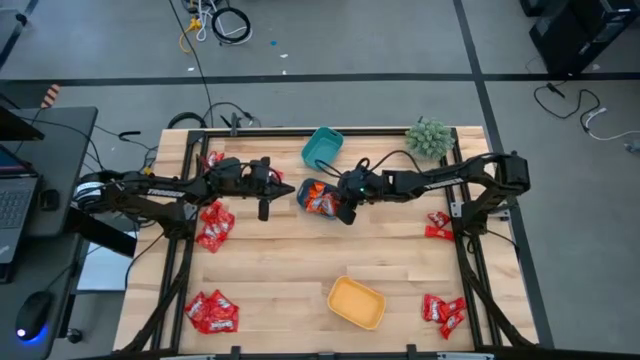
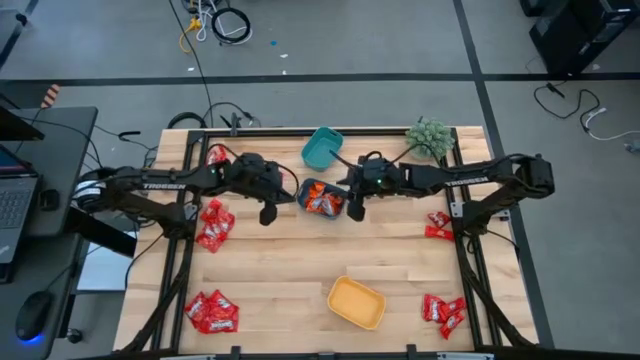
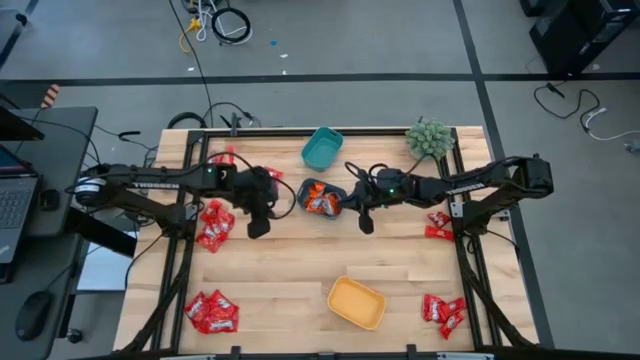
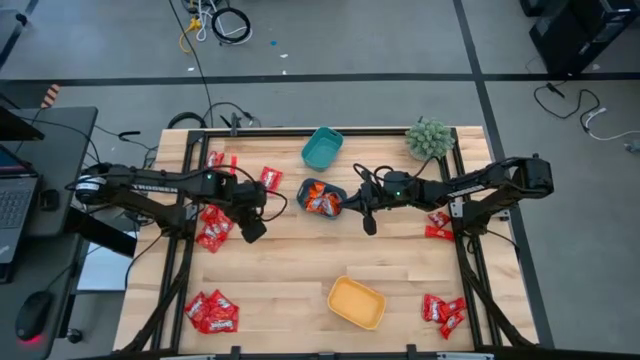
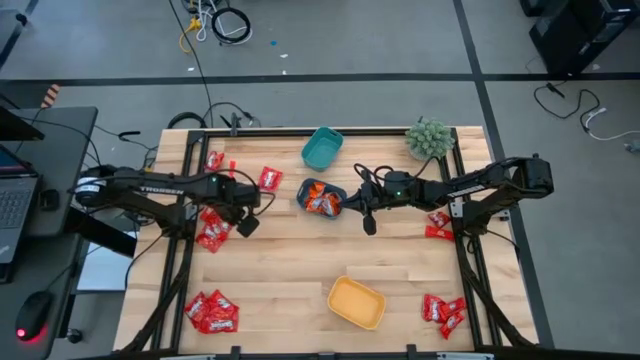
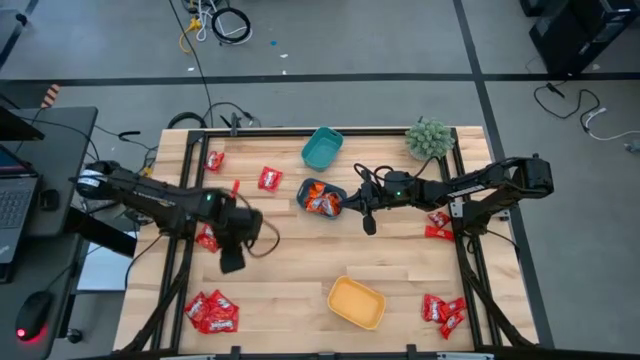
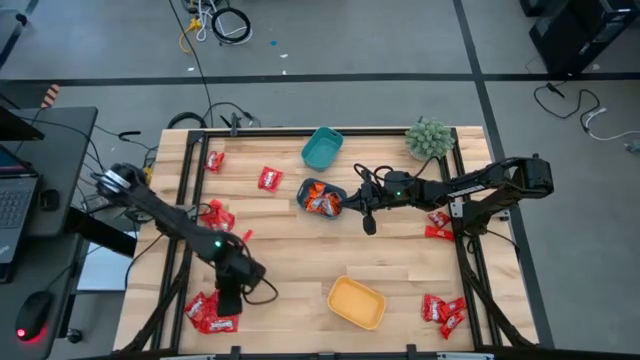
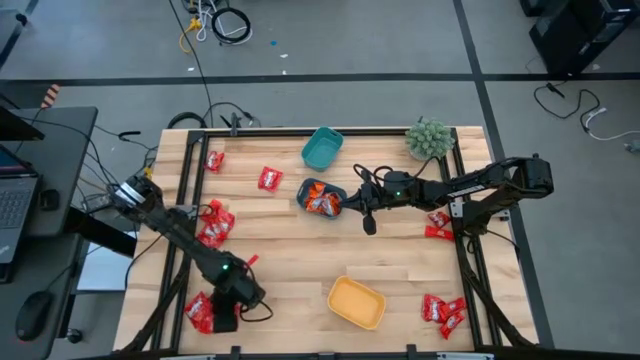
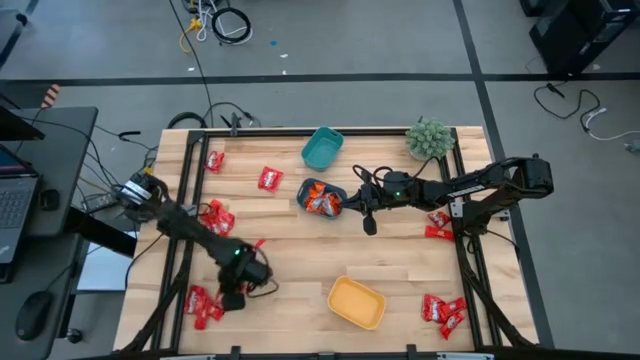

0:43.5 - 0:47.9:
Task: Sort candy
Move the red chocolate to the

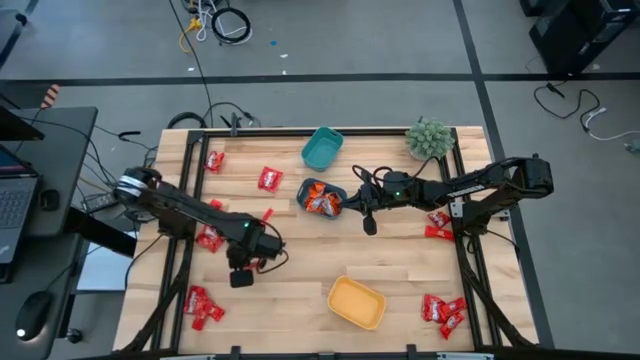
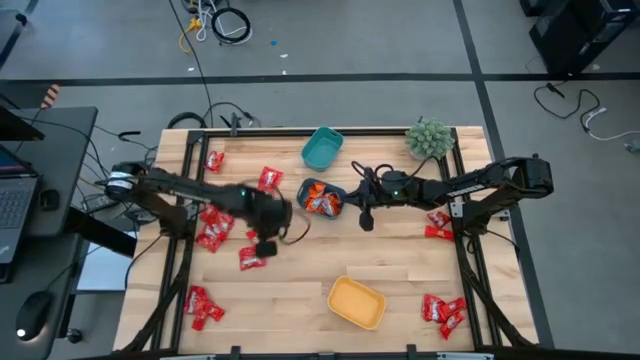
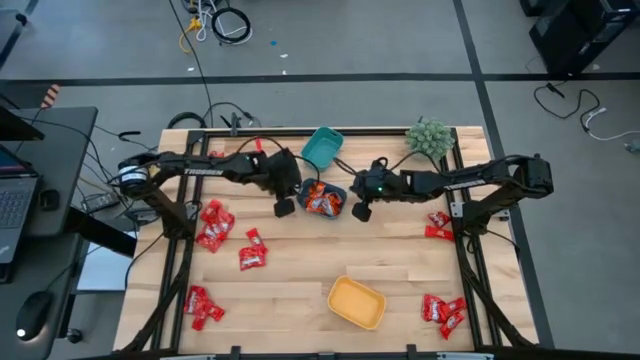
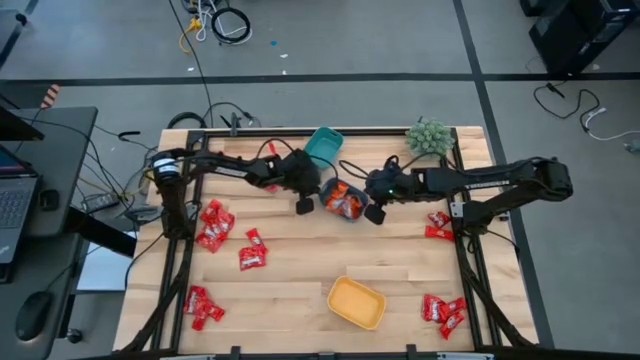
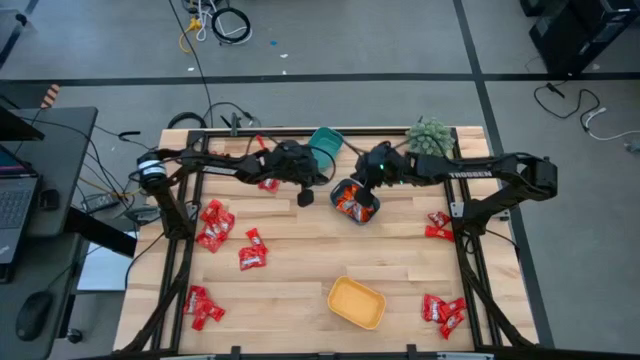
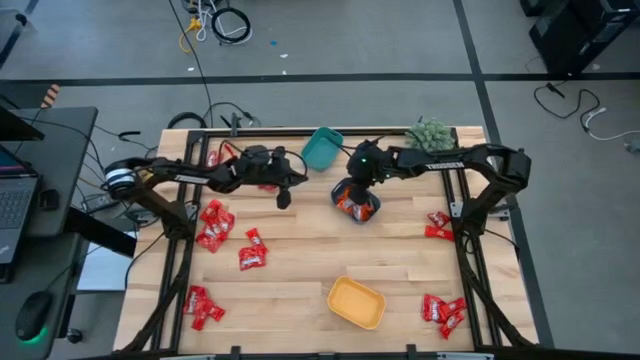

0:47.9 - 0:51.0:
Adjust the center blue bin

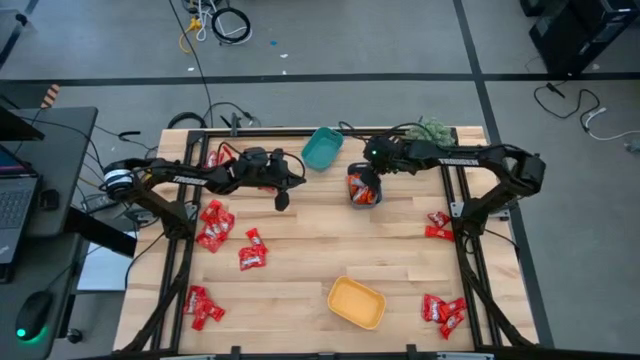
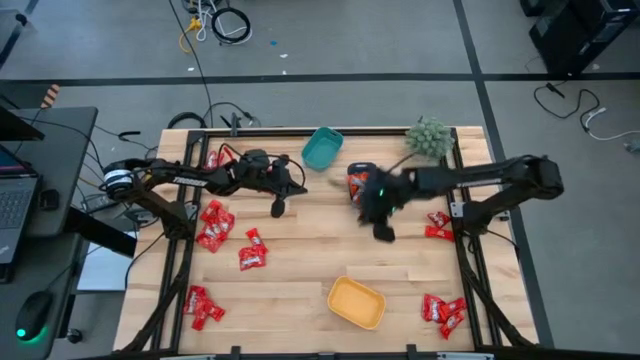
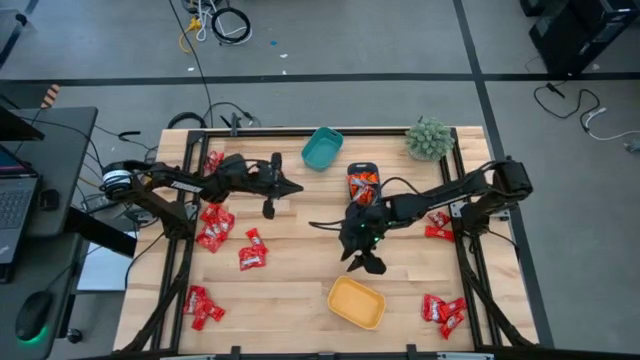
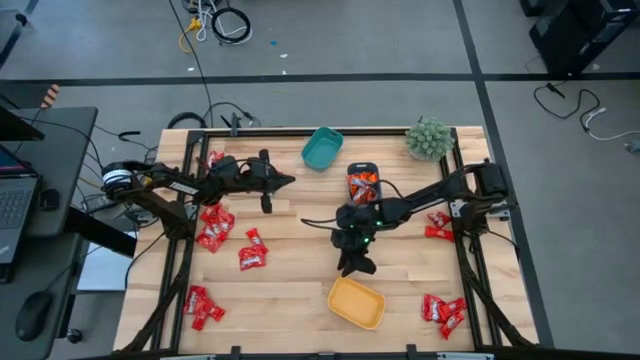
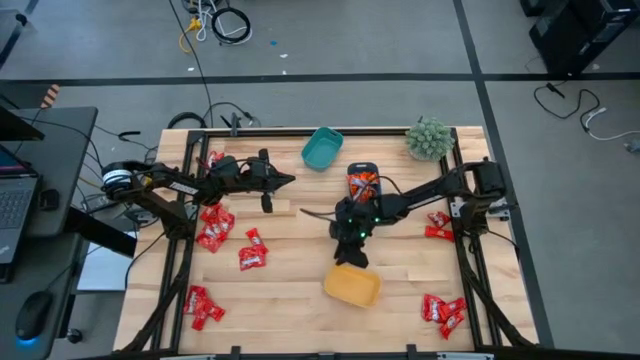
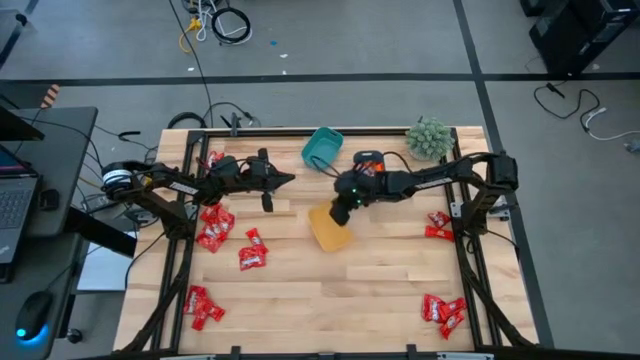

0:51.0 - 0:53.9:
Move the yellow bin to the center

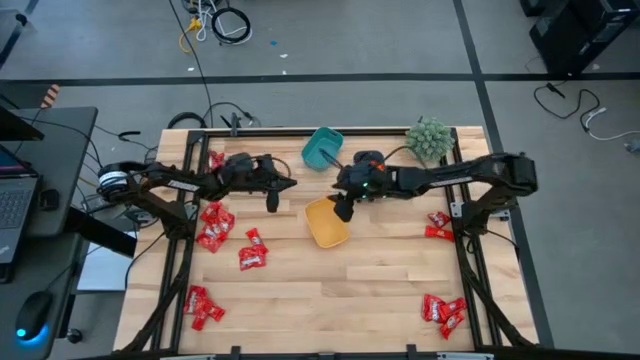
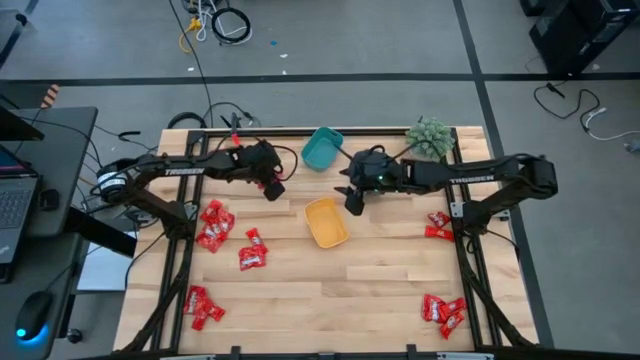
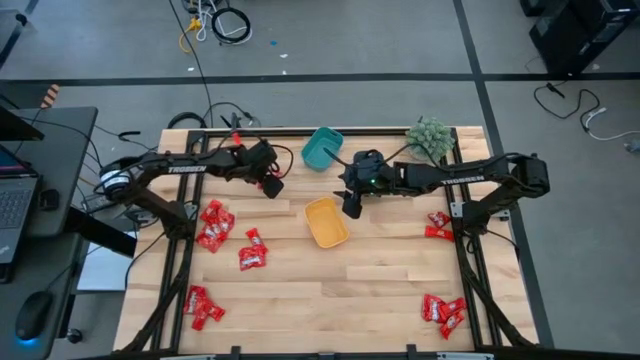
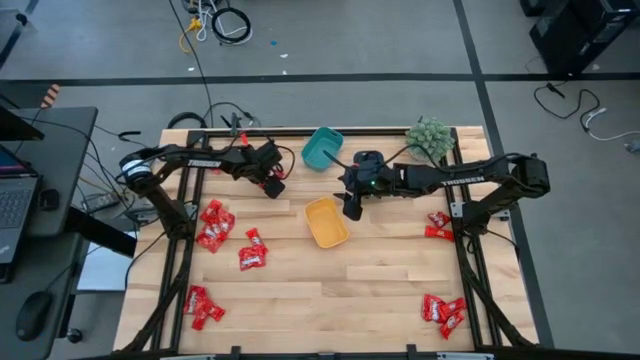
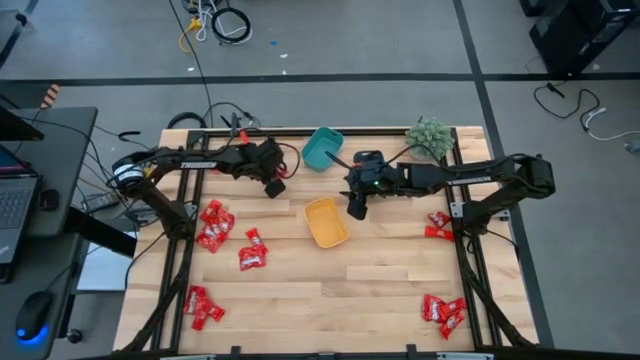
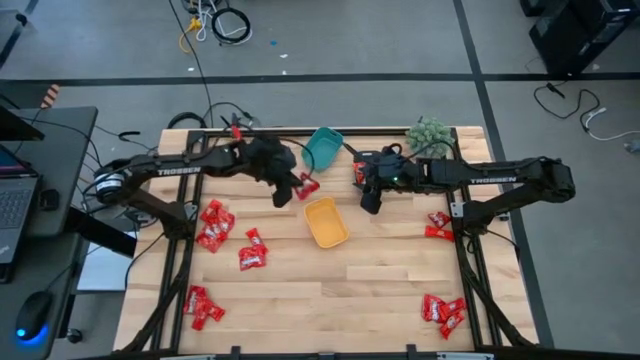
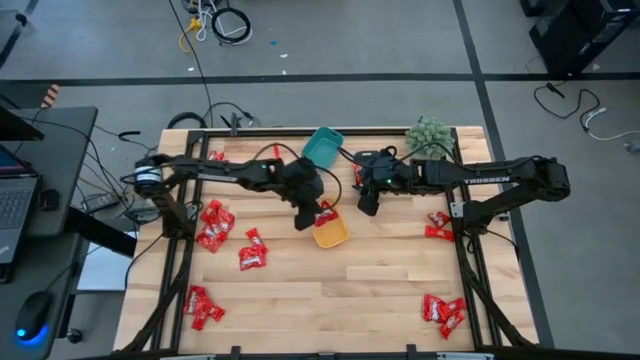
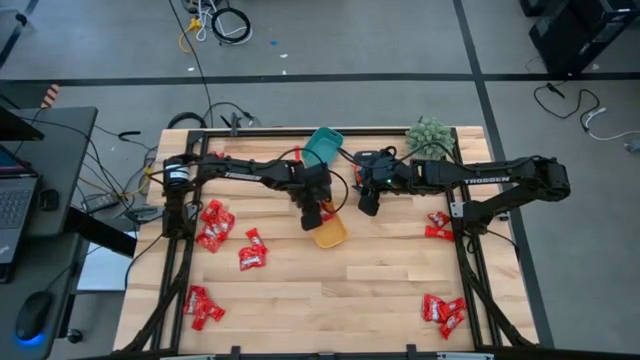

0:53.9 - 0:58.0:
Put the red candy into the yellow bin

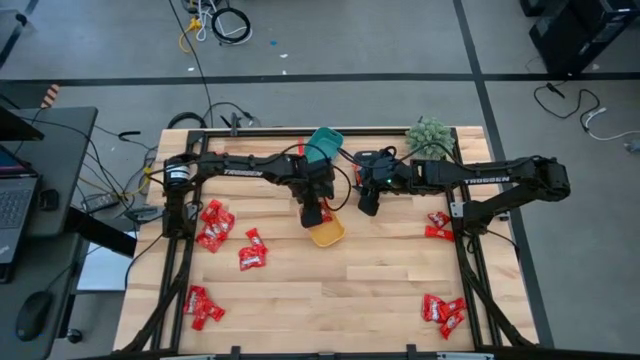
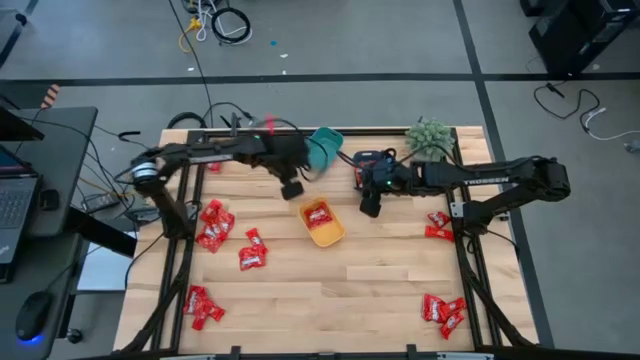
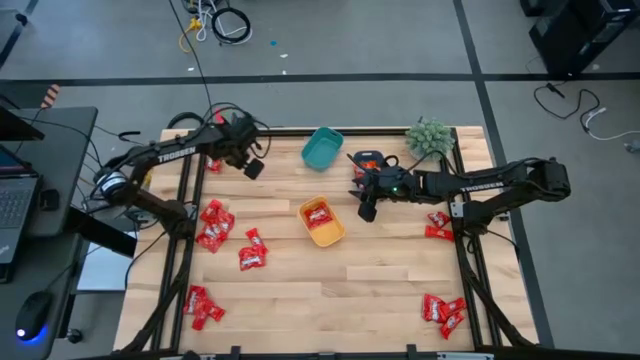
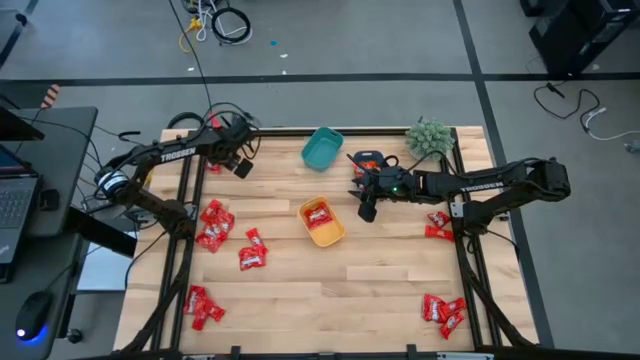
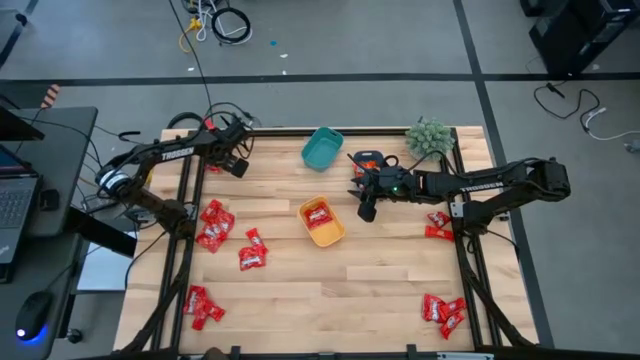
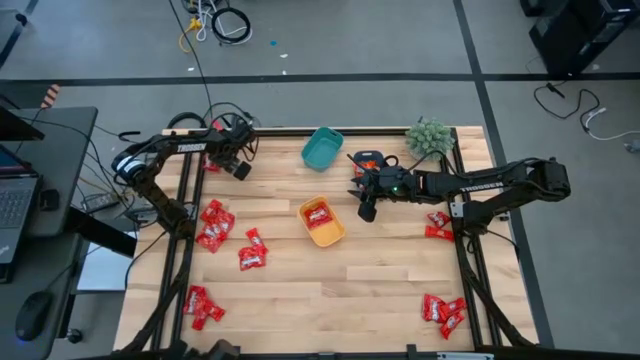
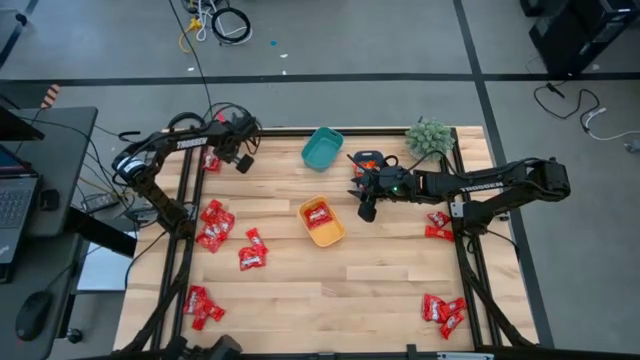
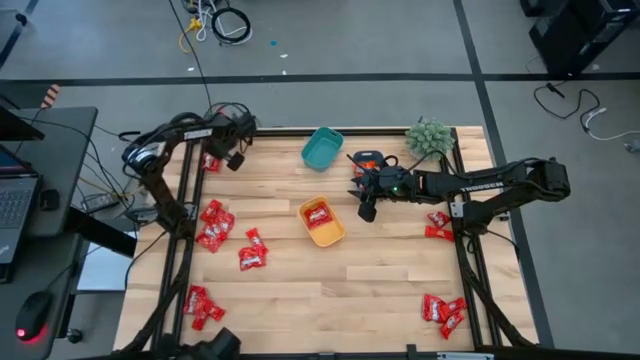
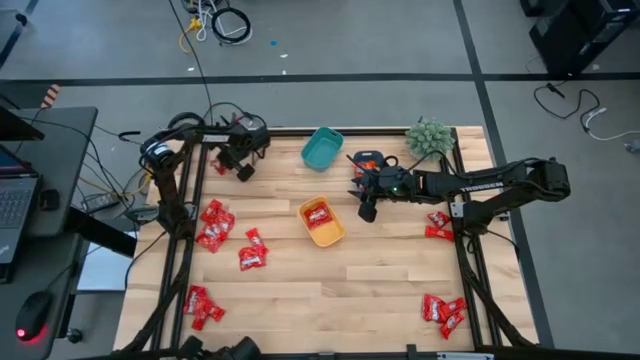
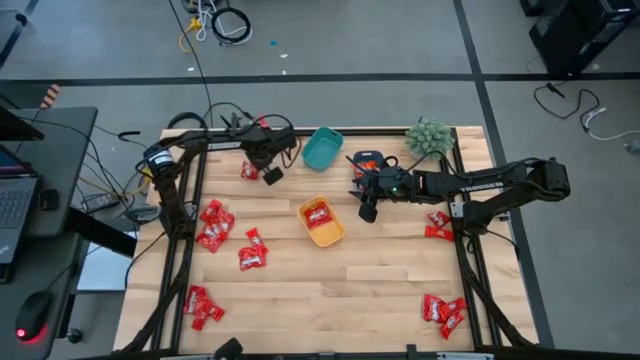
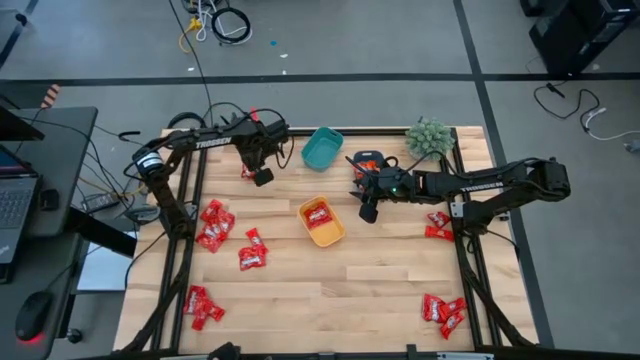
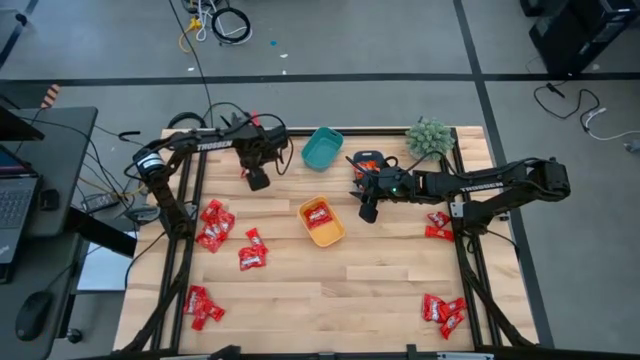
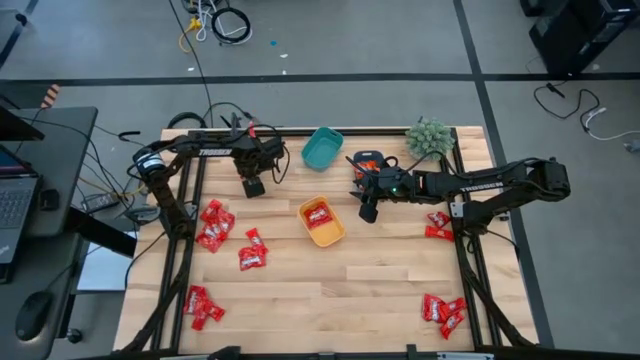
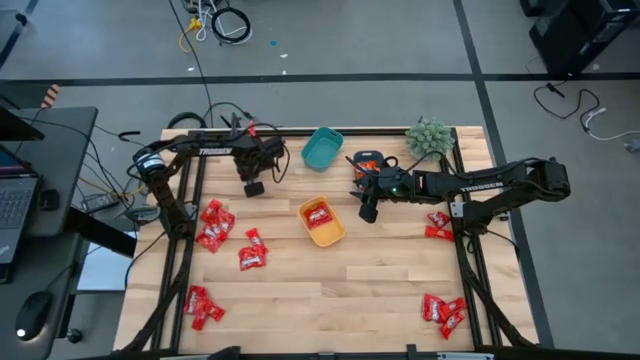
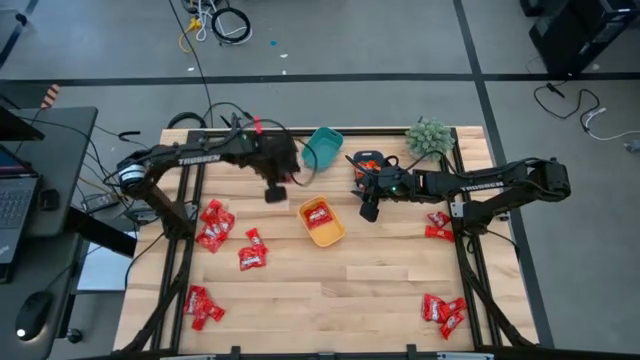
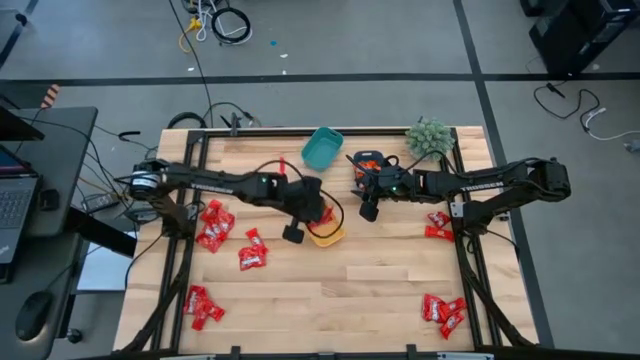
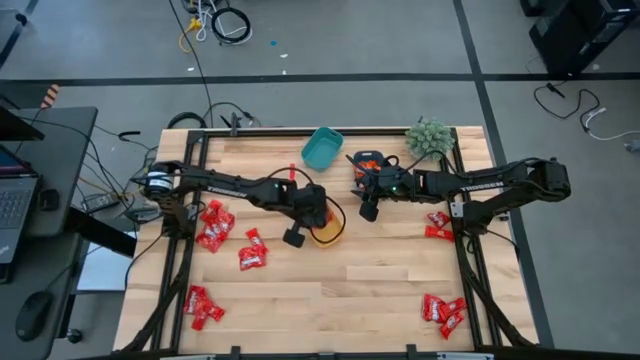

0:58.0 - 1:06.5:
Put the red candy into the yellow bin
